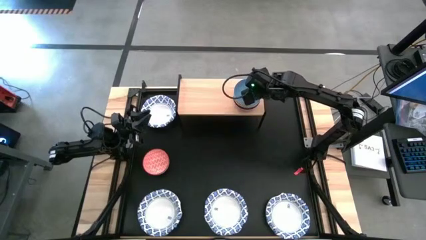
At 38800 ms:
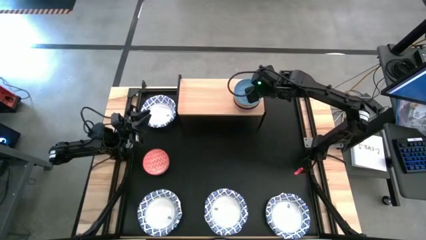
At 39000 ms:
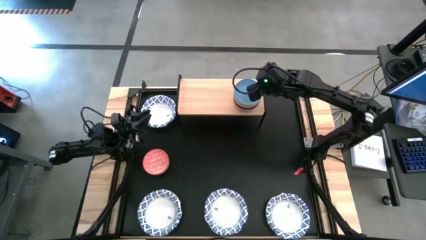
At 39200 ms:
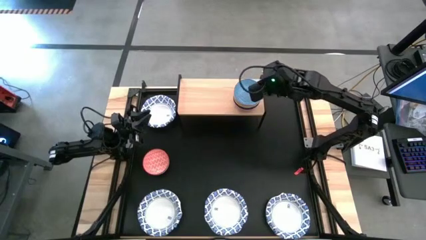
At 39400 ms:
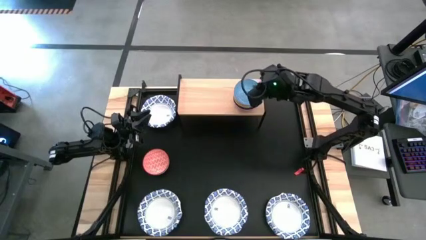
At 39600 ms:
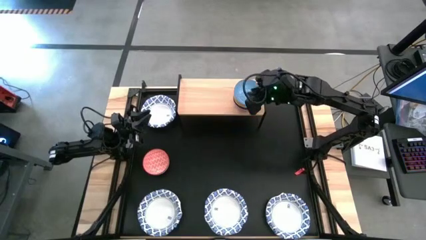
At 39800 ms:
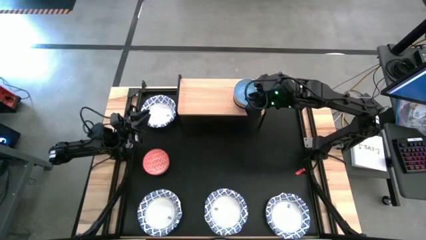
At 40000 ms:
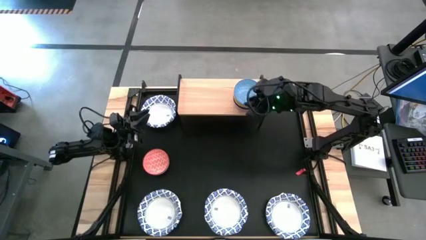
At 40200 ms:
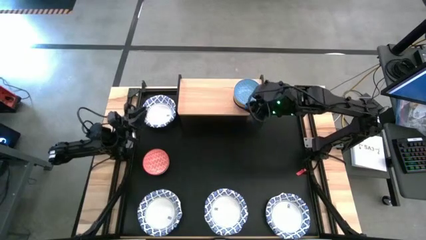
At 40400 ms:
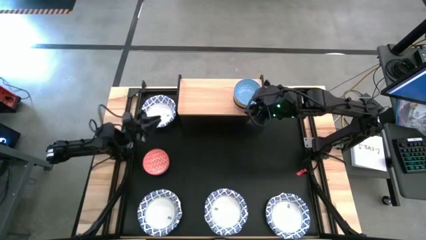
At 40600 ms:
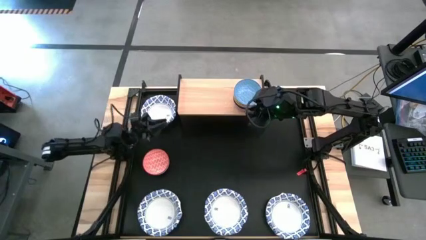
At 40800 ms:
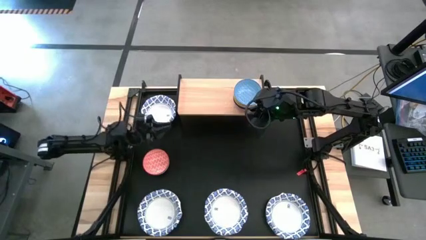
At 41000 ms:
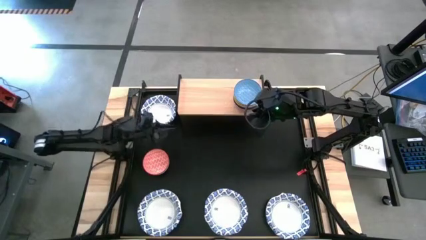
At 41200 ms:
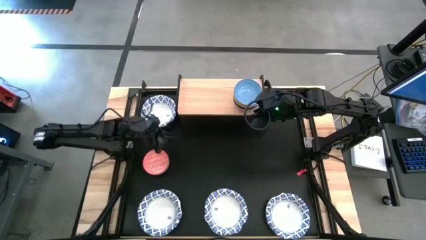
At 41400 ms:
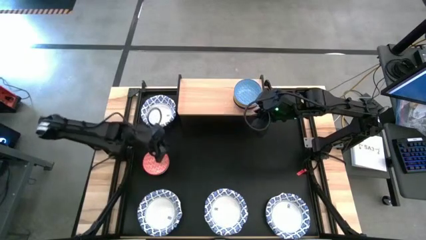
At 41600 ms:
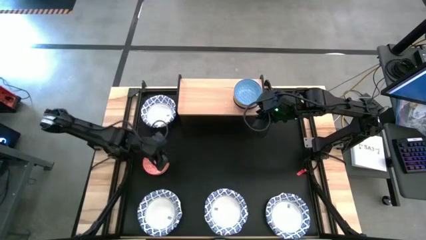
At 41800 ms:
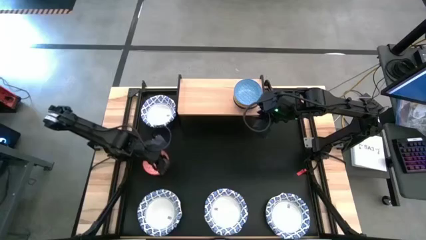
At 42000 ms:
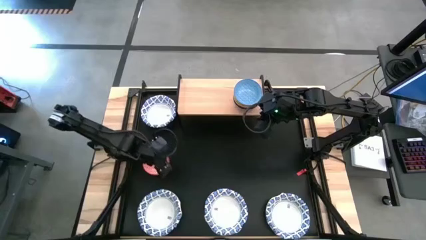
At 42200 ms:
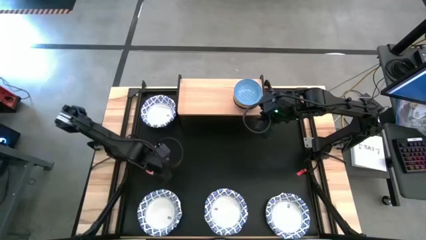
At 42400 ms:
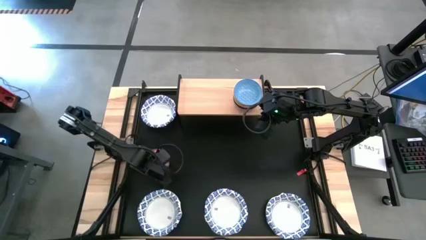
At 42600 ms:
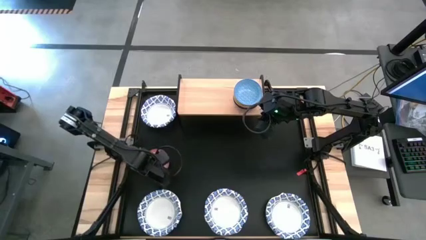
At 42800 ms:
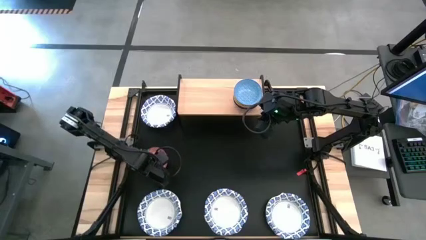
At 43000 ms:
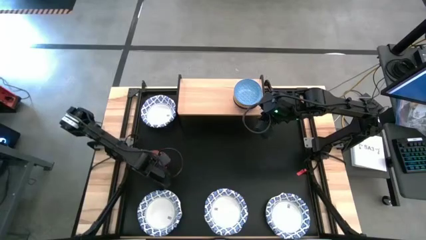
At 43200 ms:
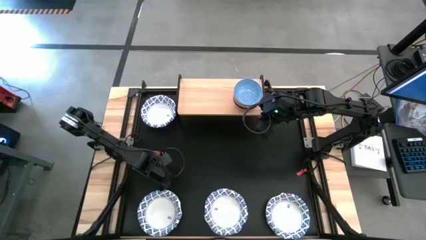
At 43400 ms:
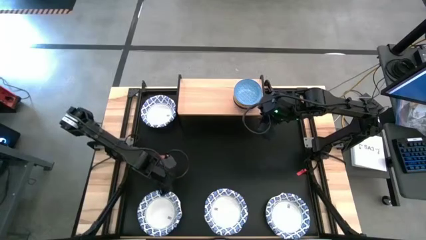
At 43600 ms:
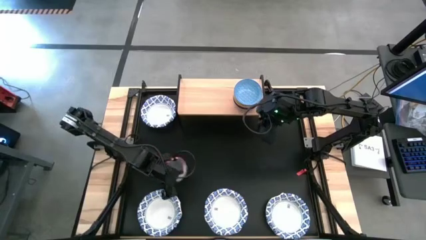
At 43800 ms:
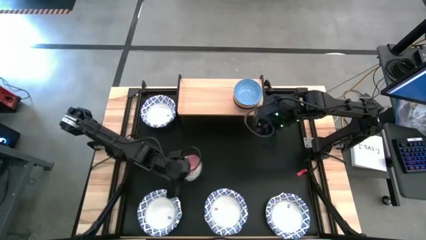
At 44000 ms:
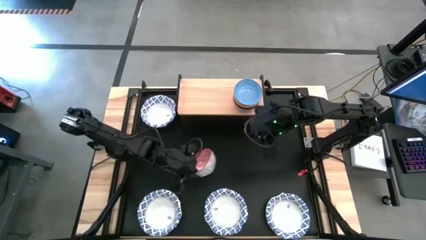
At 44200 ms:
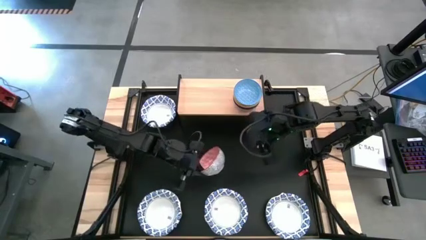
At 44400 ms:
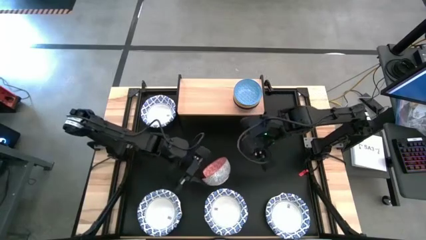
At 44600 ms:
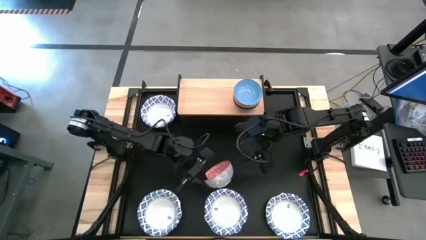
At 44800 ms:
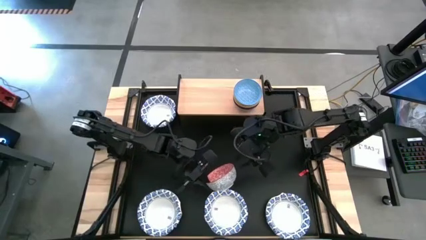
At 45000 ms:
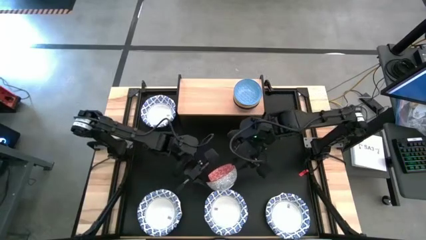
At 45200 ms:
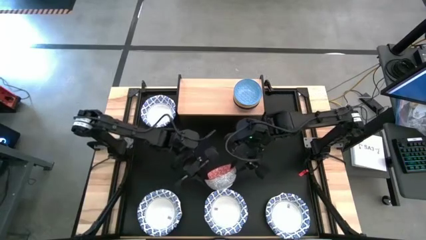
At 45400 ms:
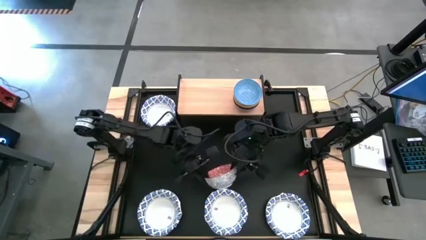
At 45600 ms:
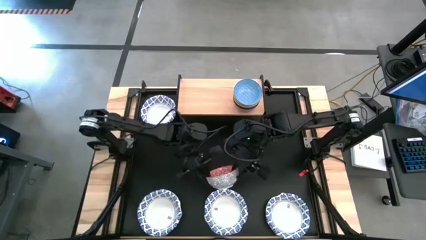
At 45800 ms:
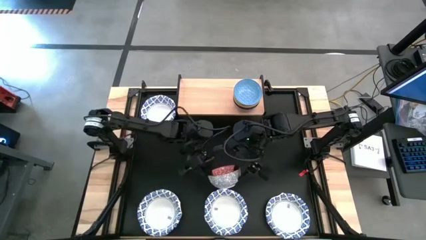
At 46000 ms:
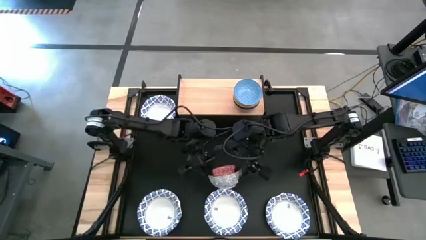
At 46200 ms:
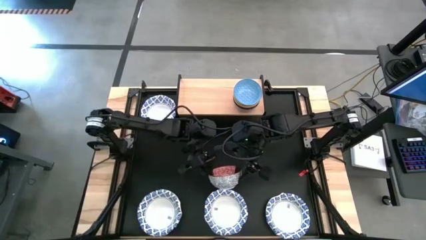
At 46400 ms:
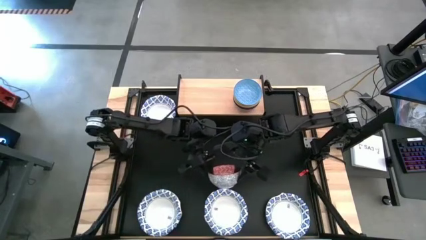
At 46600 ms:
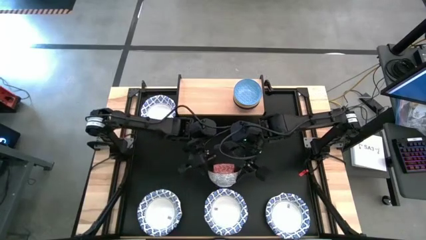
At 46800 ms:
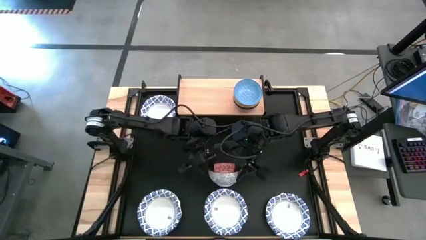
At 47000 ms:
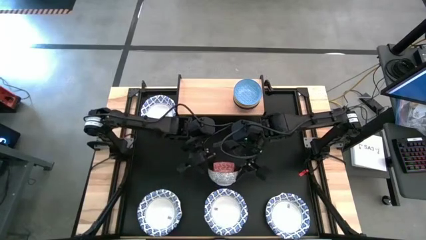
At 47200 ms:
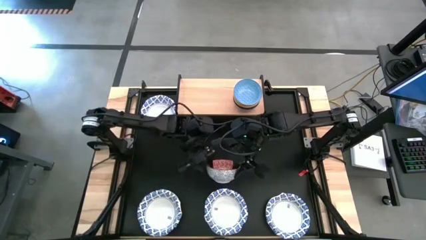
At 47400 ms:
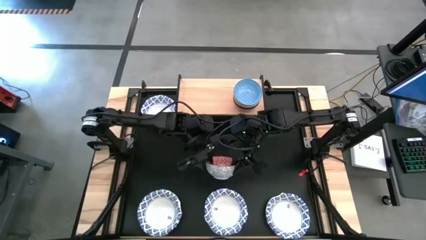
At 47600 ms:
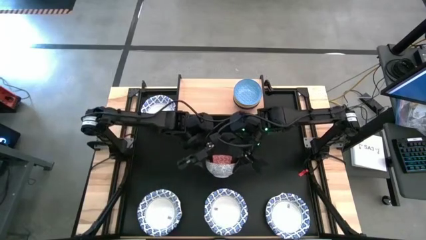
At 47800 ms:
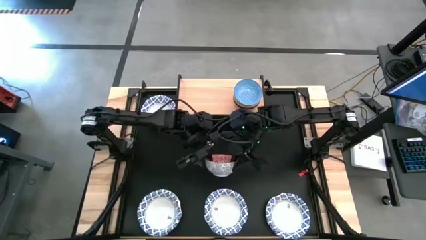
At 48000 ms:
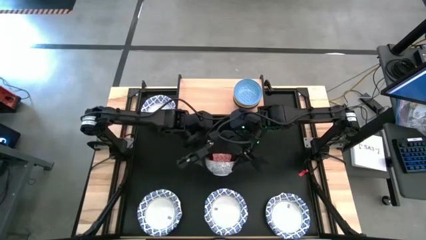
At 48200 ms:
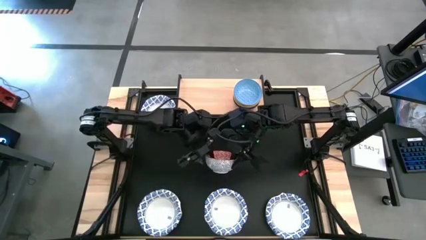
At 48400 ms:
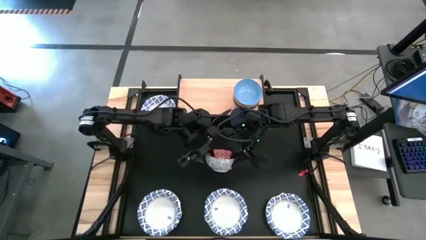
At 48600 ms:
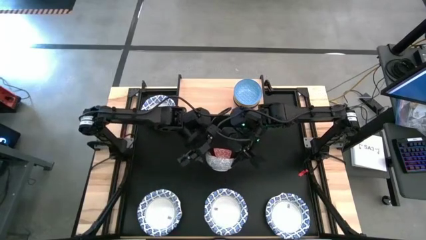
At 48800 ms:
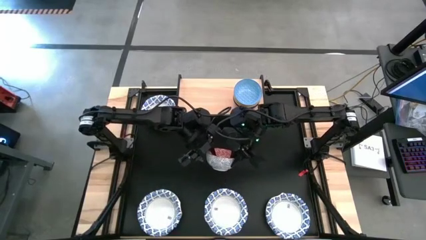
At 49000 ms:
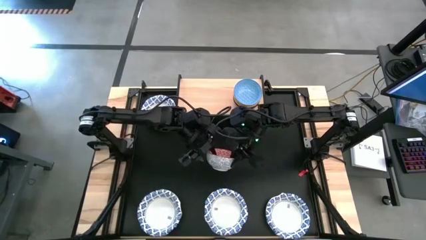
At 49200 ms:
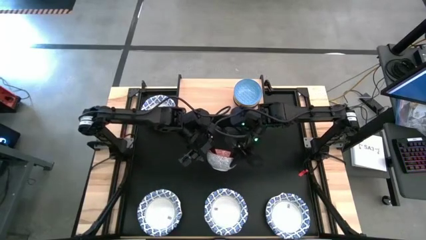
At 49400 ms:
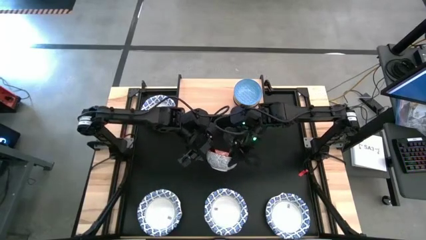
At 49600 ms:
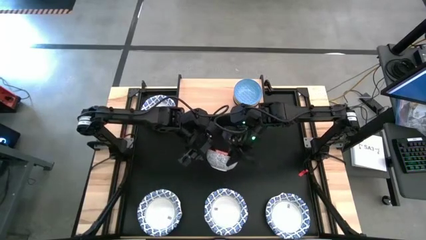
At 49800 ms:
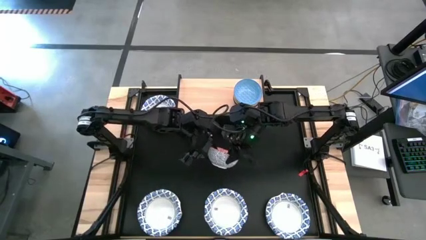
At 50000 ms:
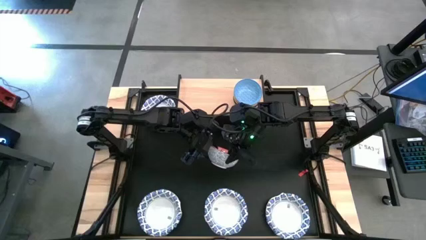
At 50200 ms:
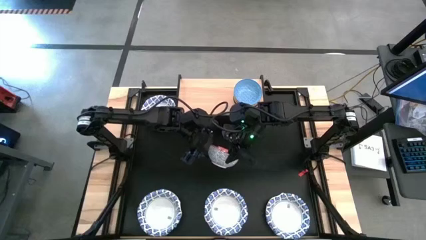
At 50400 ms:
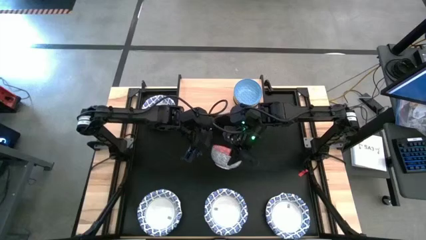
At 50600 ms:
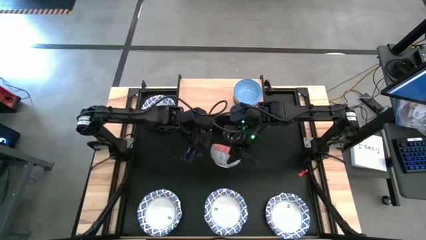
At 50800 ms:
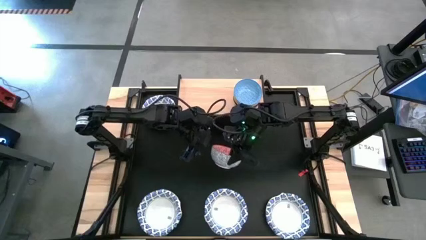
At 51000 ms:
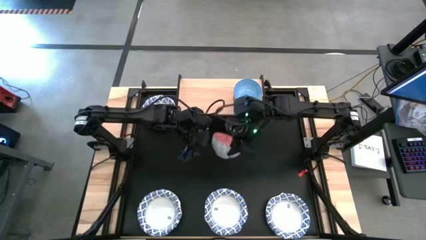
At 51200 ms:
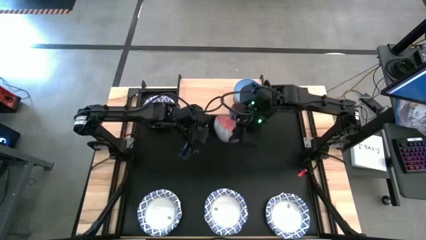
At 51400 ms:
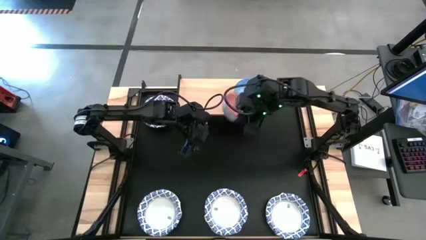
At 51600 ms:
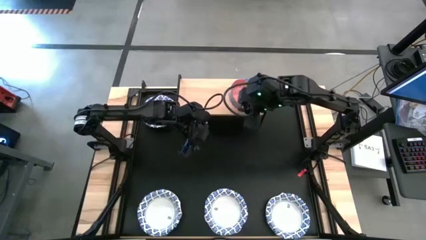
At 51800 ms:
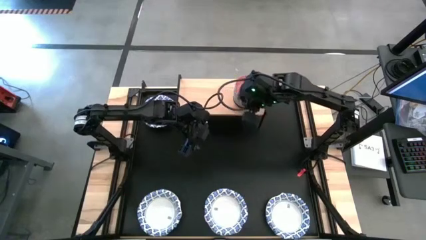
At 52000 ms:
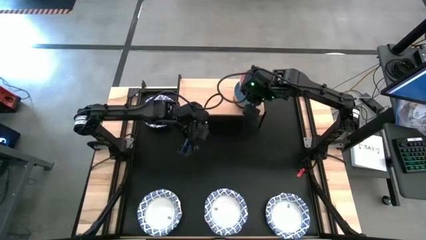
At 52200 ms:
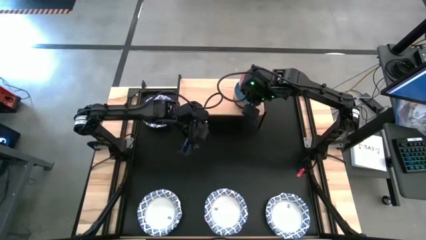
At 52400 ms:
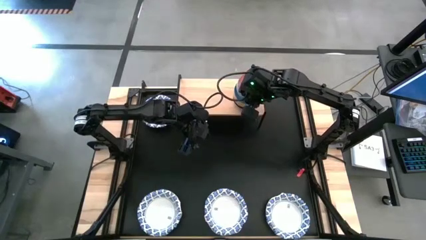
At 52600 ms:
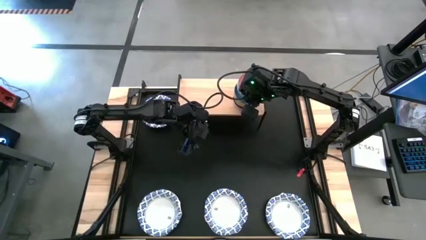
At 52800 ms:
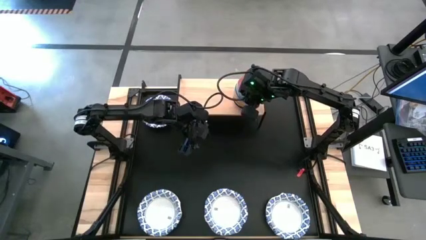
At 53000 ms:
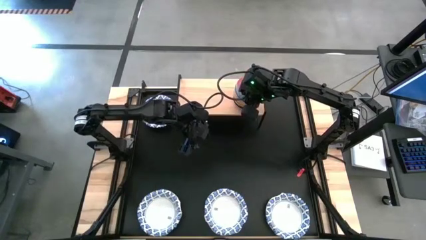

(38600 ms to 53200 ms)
Task: Place and stack bowls onto a shelf
Stack the middle left red bowl on top of the light blue stacked bowls on the shelf
